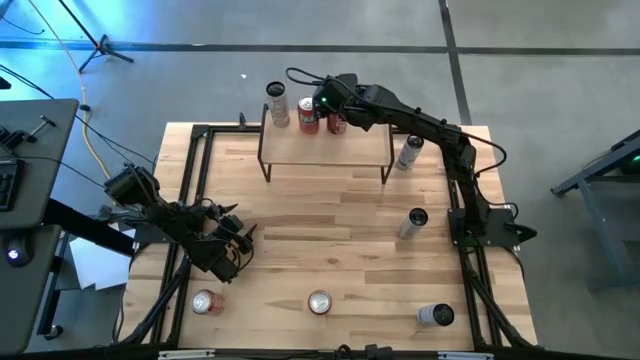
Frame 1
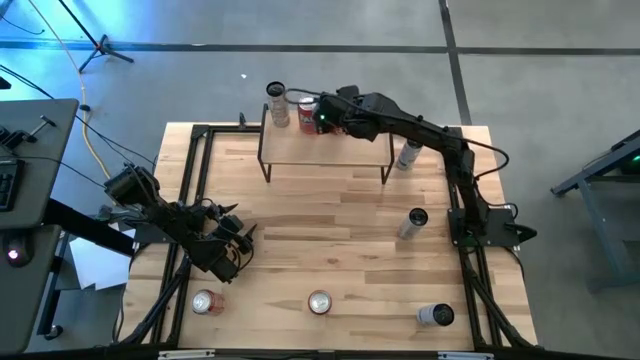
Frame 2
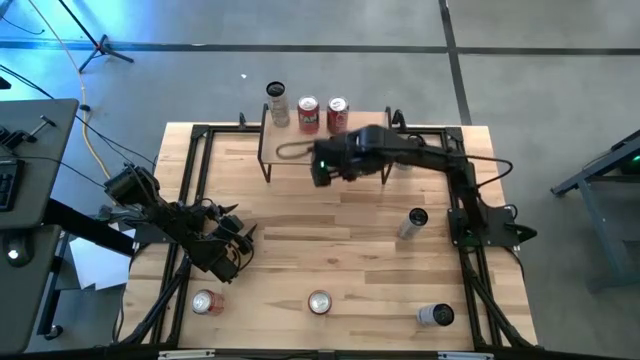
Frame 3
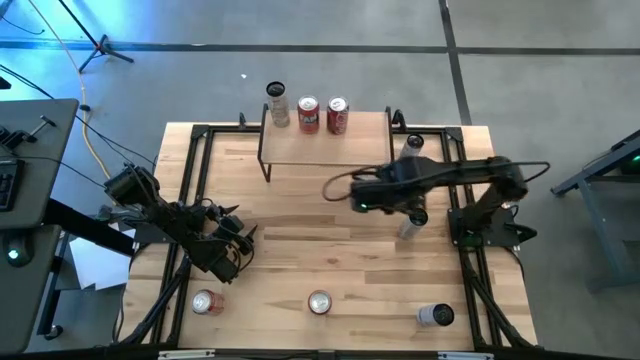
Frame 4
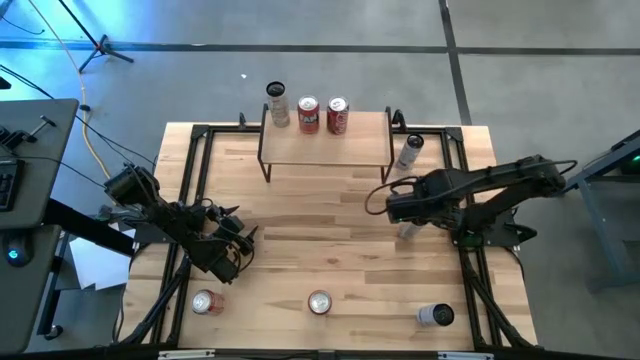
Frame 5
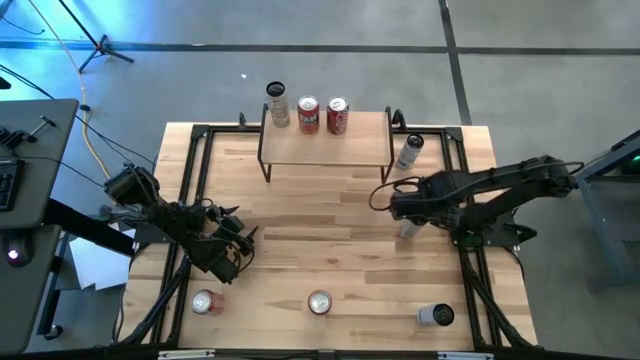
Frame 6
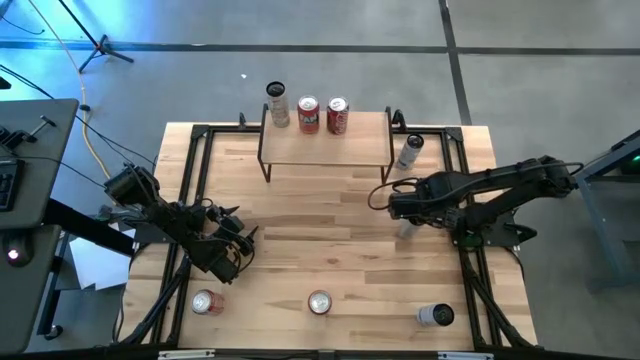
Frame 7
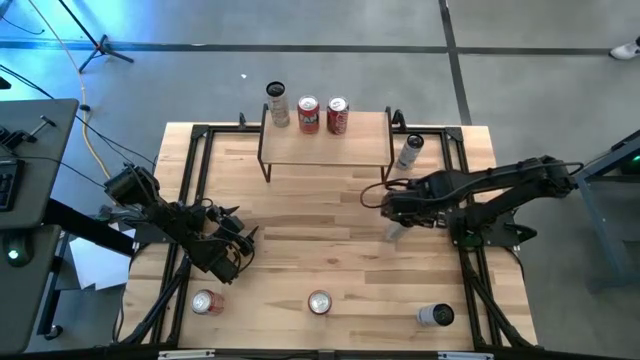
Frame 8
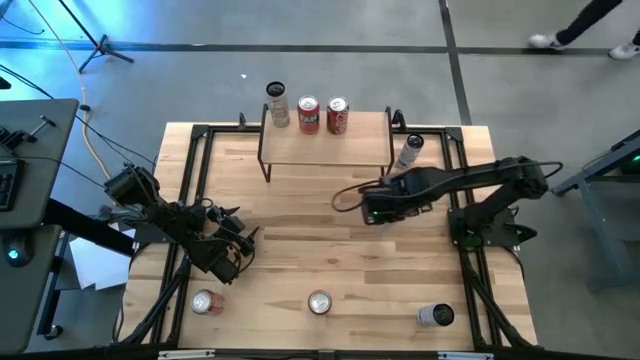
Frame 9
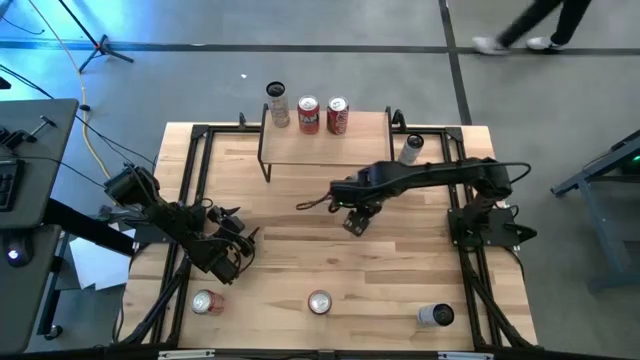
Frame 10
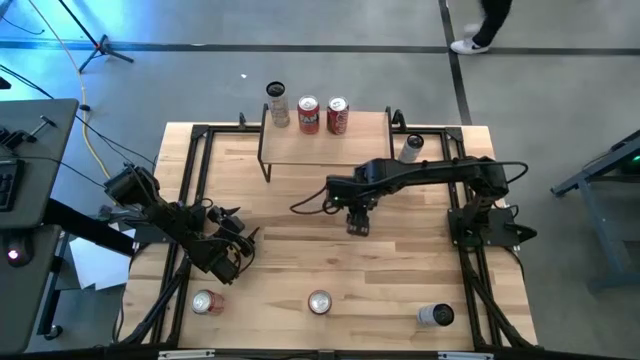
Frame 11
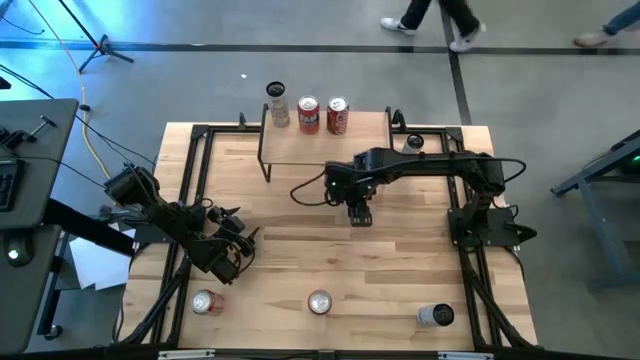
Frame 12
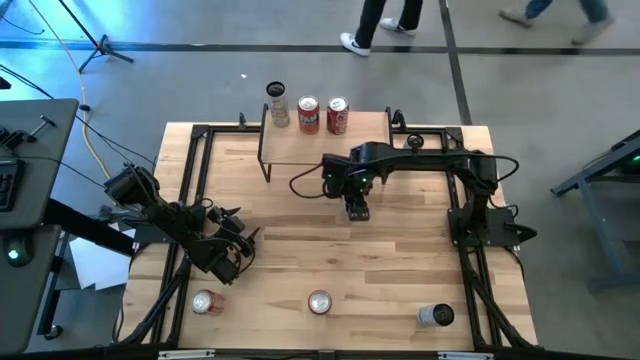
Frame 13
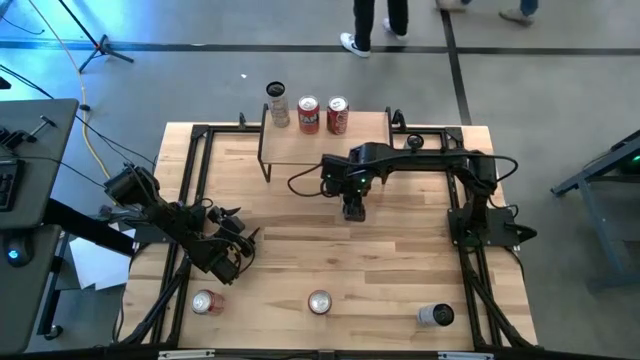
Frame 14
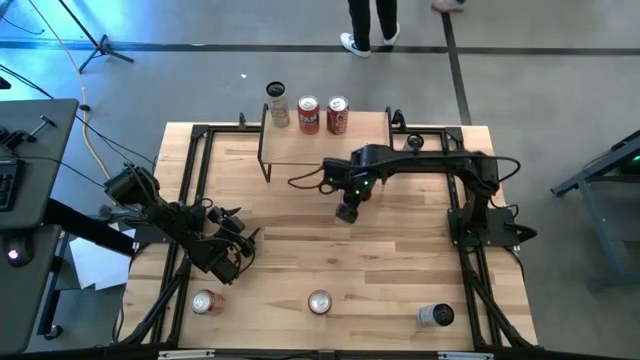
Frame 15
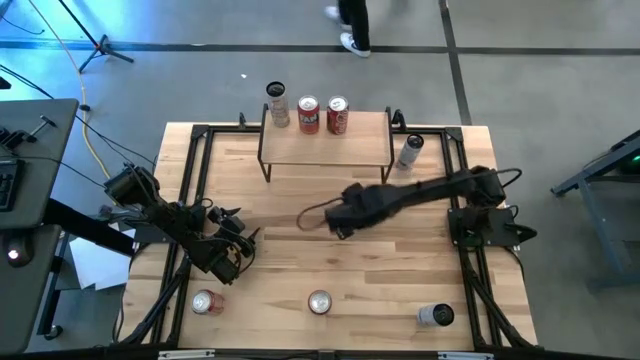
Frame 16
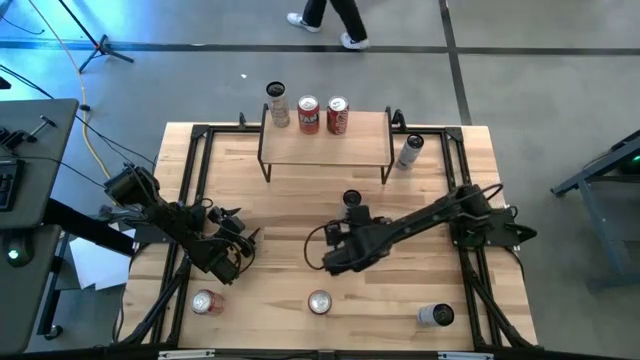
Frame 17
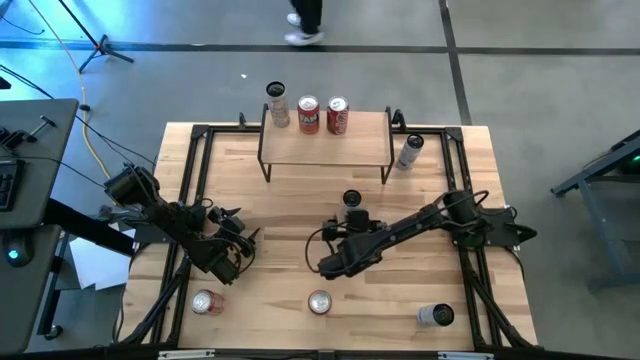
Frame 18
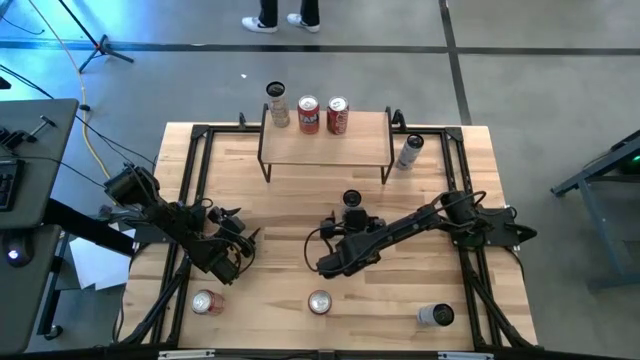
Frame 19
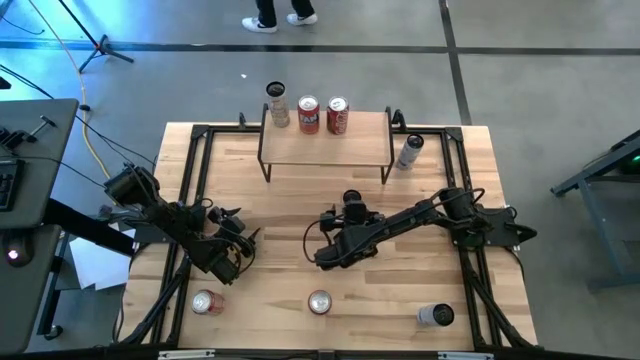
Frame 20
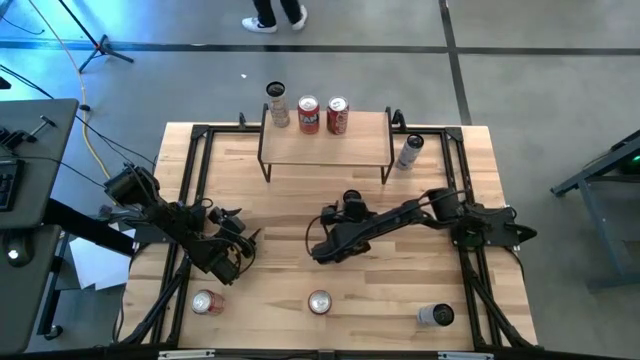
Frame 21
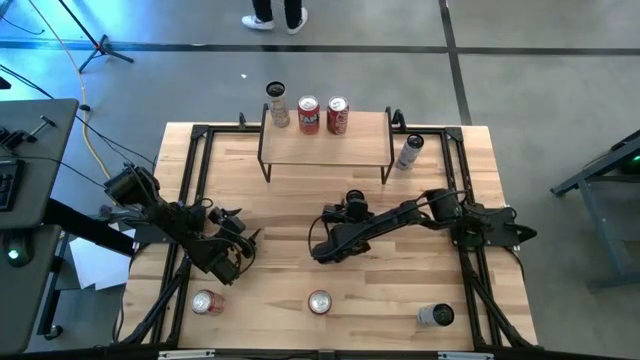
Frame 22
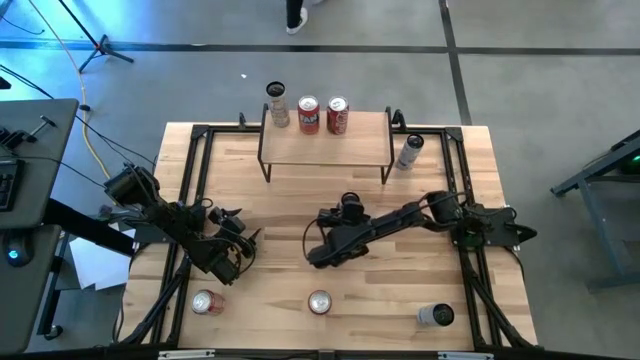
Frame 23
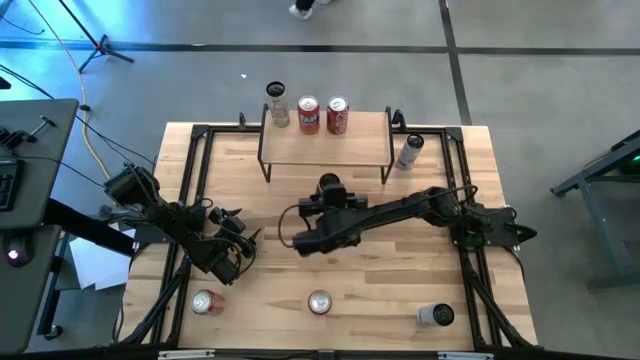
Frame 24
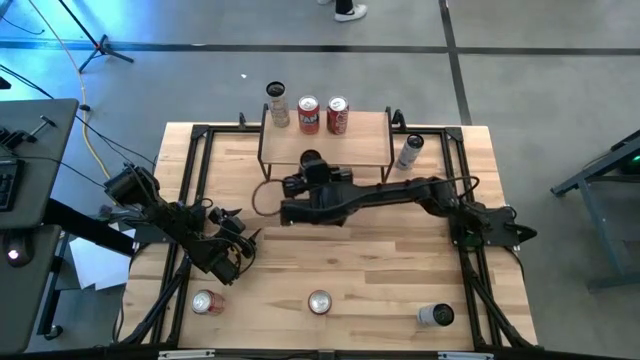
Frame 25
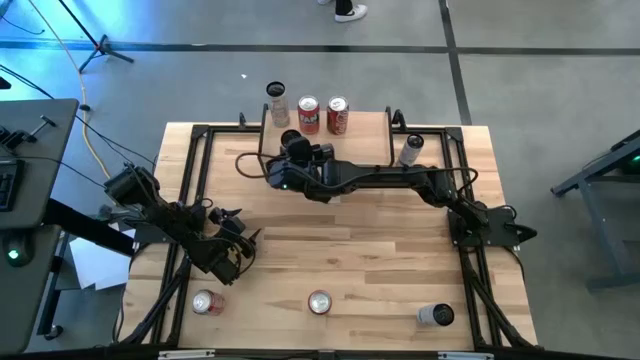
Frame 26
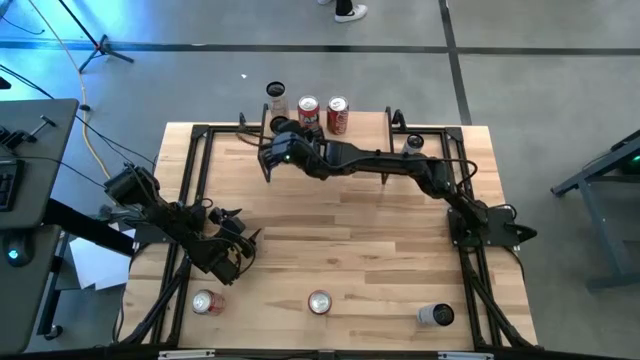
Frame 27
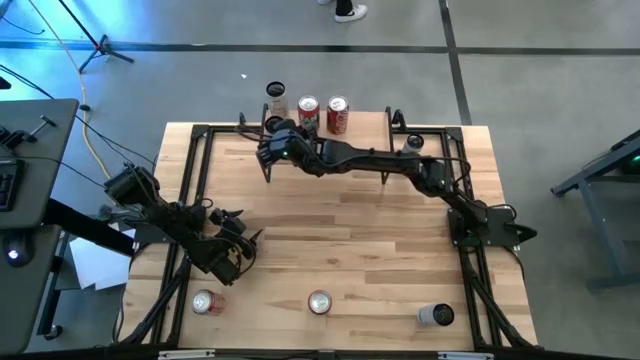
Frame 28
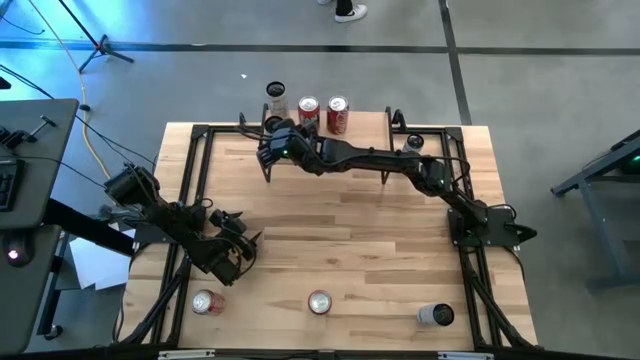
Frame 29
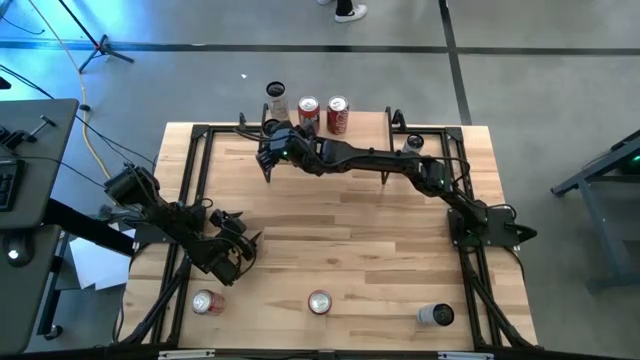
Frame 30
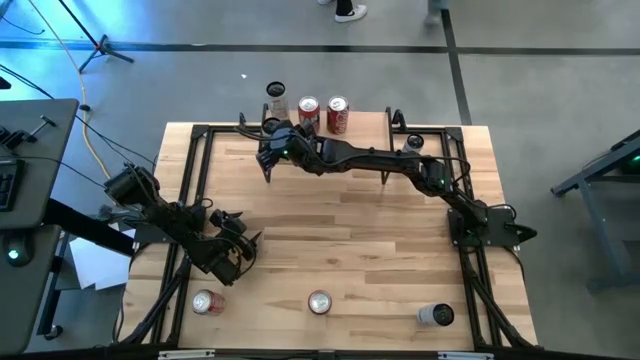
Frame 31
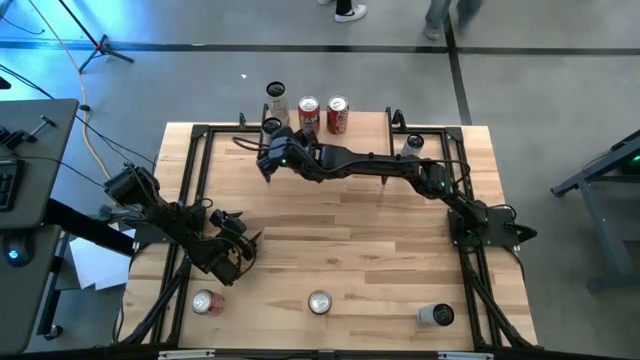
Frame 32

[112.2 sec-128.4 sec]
Task: Place canned beverage on shelf
Put the white and yellow soda can on the shelf aligned with the other white and yellow soda can

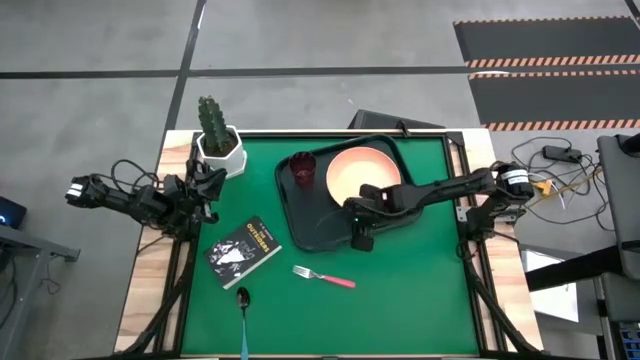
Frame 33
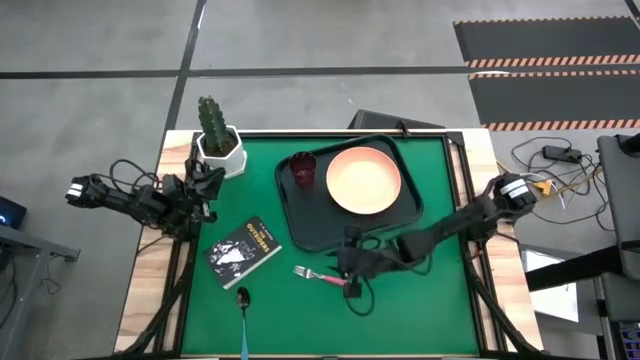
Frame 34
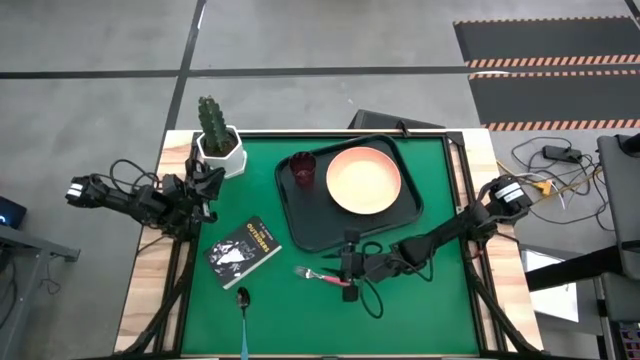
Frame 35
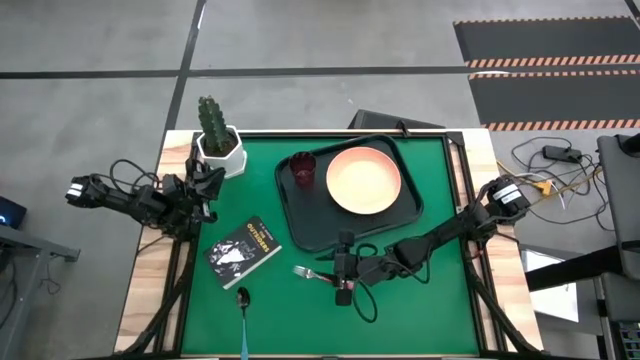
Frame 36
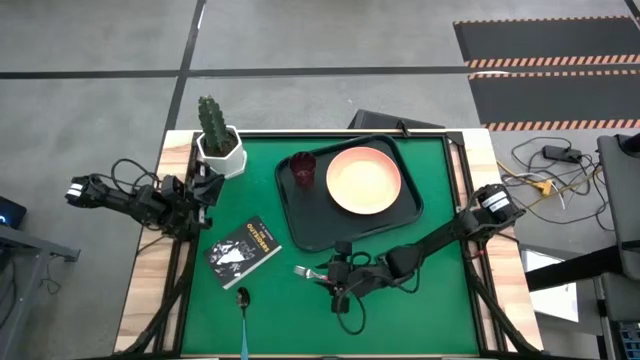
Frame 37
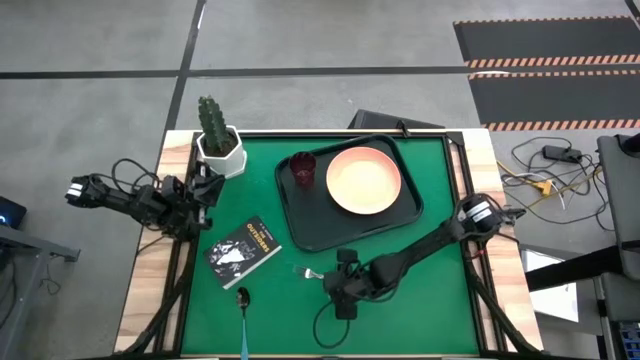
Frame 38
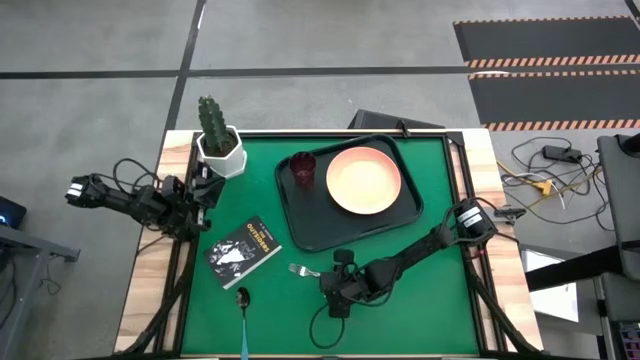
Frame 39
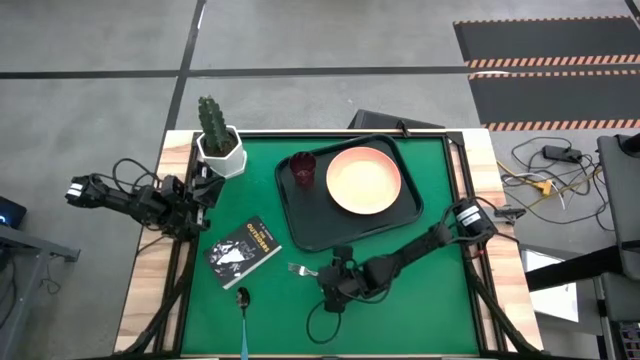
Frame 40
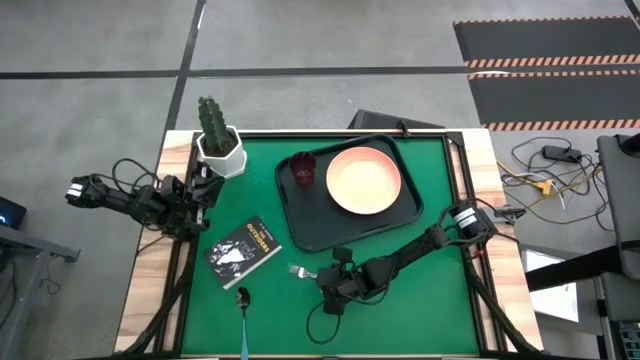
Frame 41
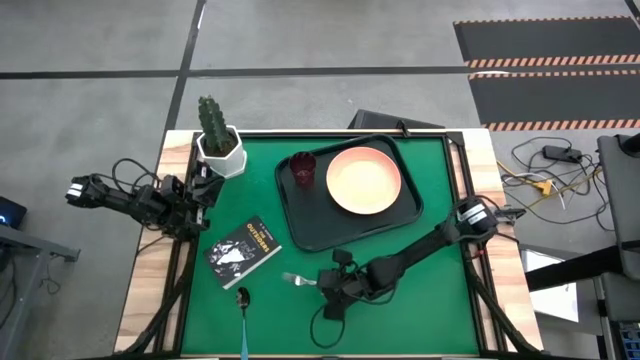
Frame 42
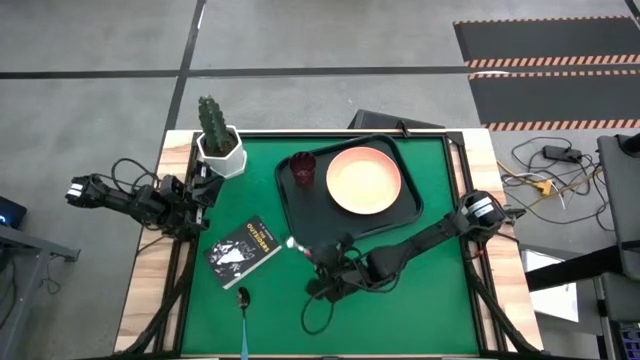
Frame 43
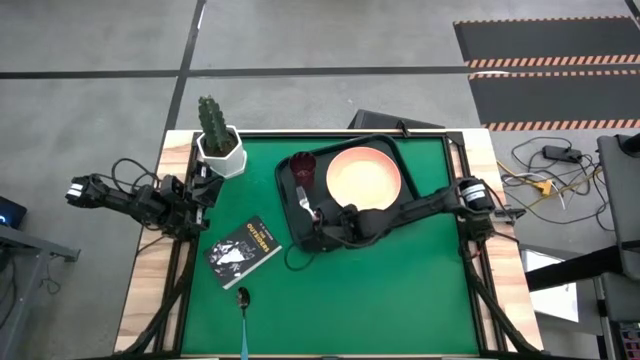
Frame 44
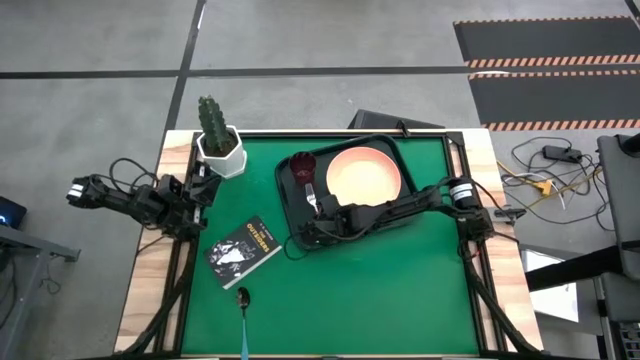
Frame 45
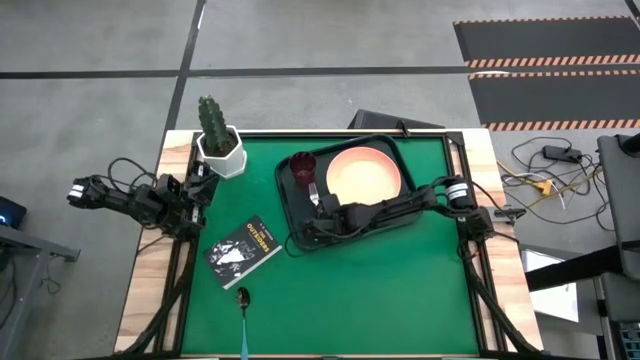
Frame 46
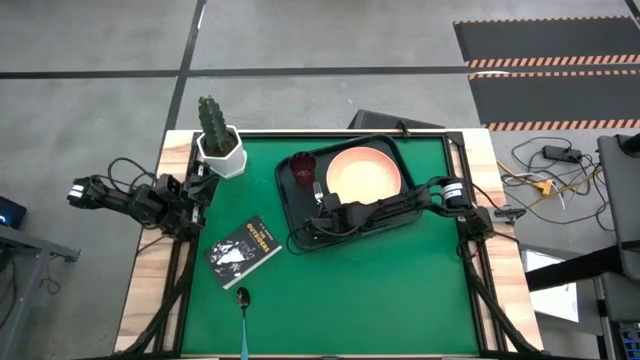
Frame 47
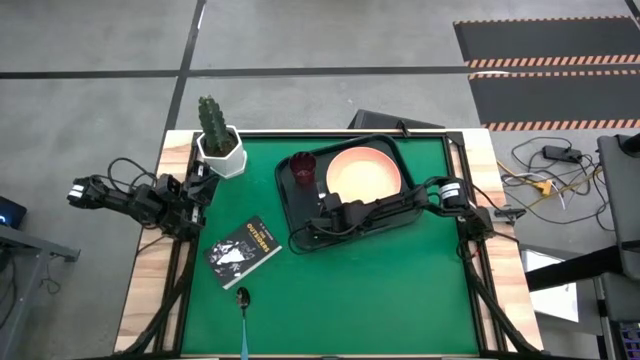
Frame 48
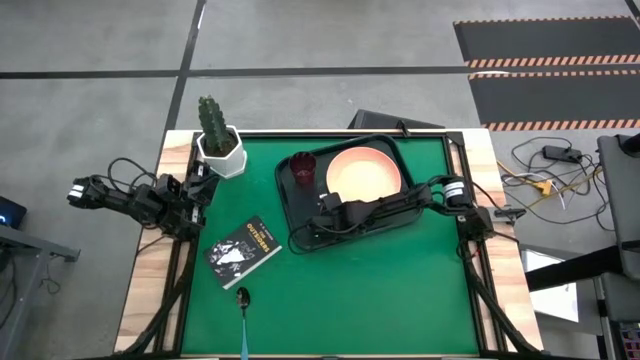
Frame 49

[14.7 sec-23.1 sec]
Task: Pick and place plate/cup/fork/spoon on tray
Put the pink fork on the black serving tray to the left side of the pink plate
